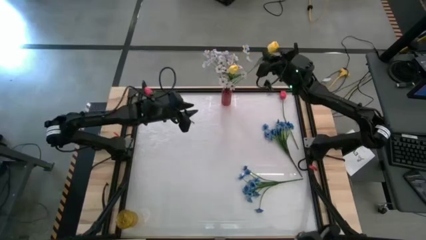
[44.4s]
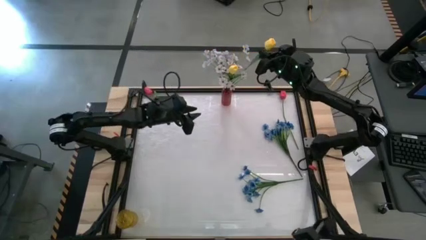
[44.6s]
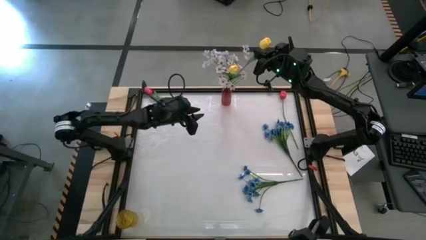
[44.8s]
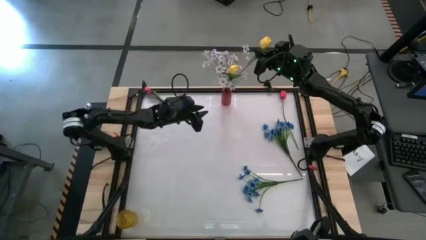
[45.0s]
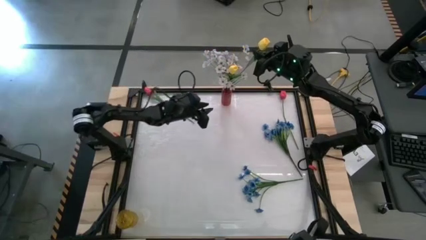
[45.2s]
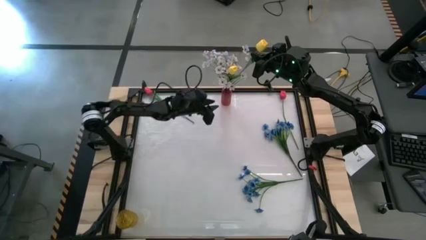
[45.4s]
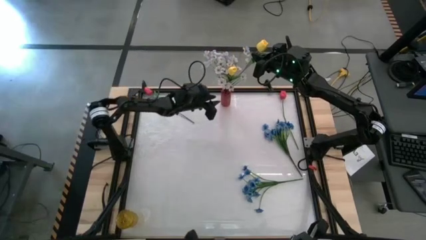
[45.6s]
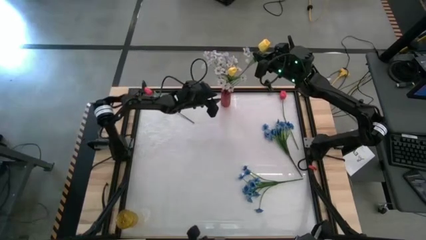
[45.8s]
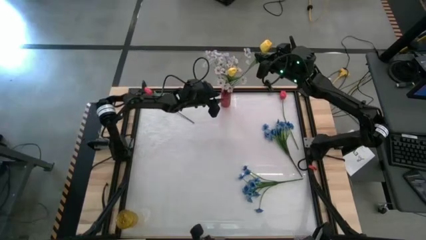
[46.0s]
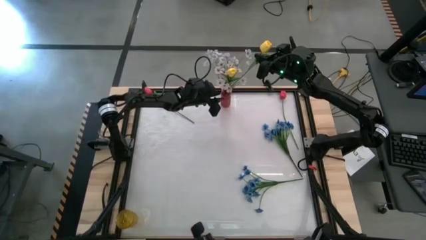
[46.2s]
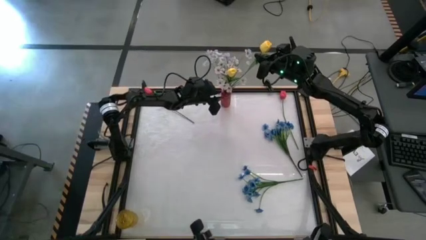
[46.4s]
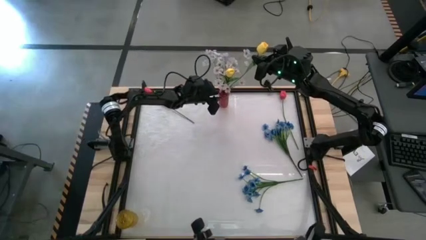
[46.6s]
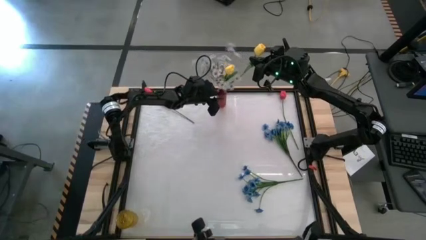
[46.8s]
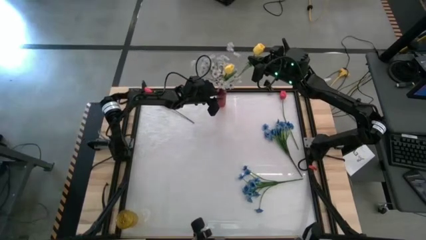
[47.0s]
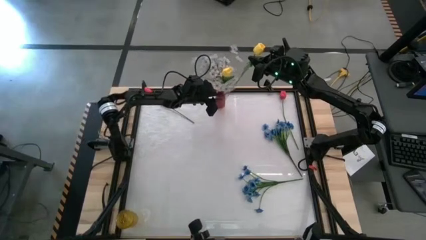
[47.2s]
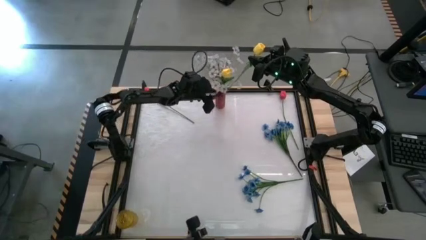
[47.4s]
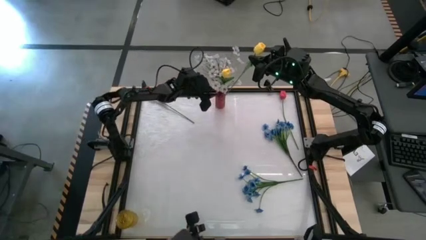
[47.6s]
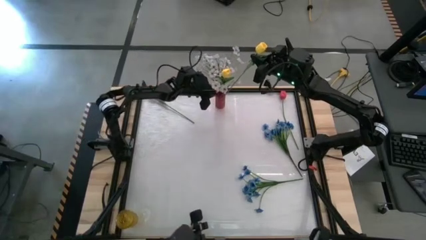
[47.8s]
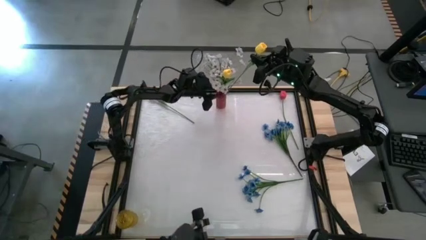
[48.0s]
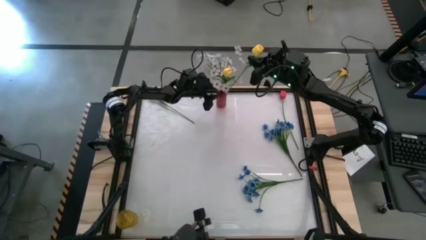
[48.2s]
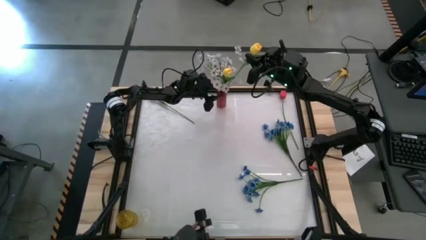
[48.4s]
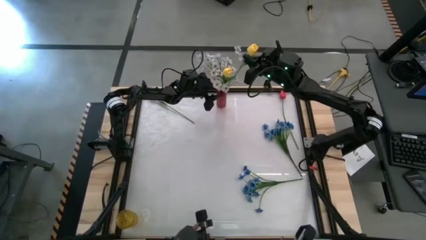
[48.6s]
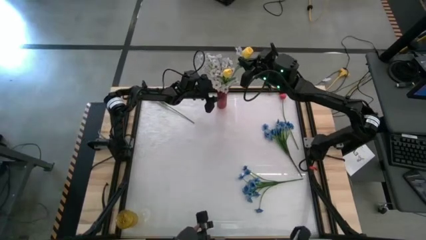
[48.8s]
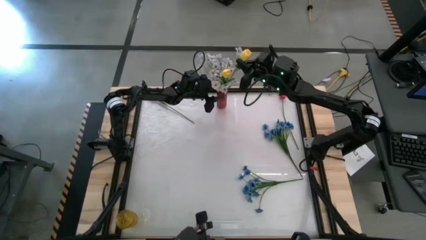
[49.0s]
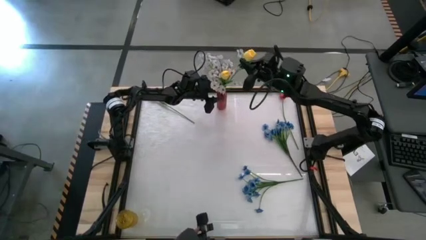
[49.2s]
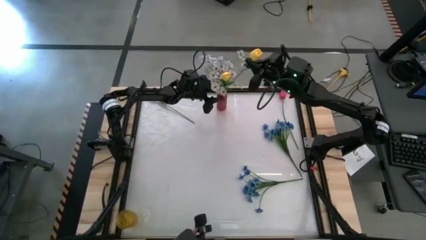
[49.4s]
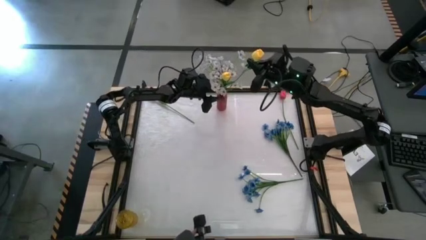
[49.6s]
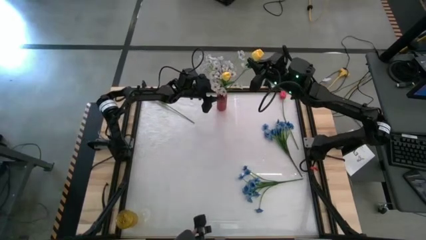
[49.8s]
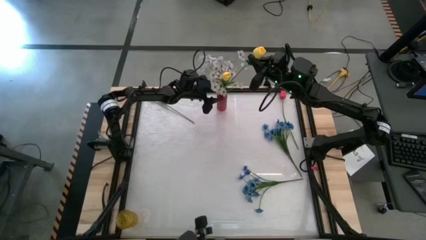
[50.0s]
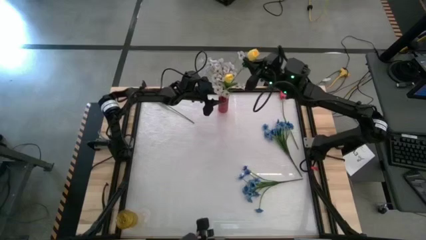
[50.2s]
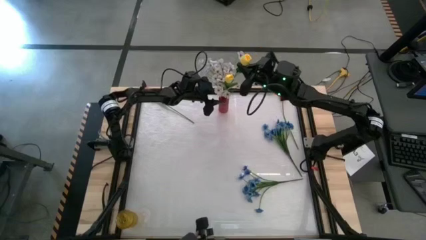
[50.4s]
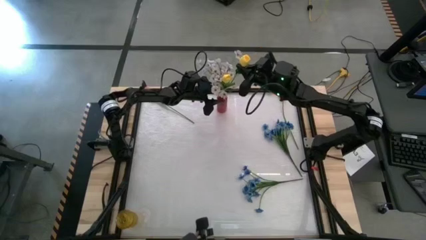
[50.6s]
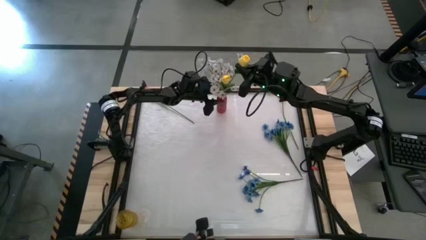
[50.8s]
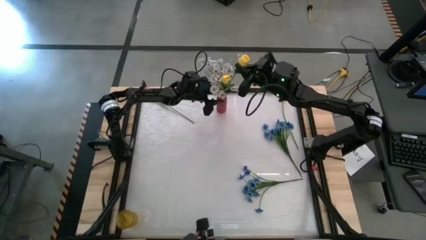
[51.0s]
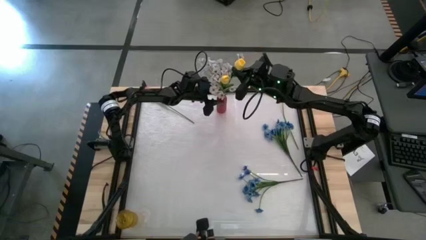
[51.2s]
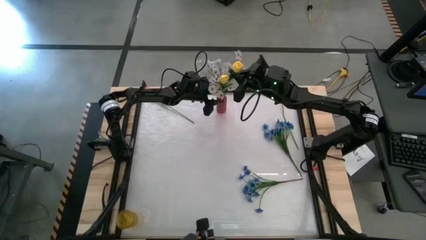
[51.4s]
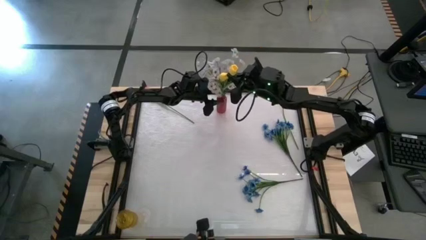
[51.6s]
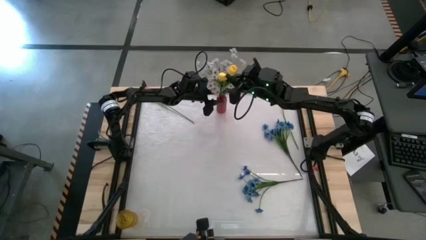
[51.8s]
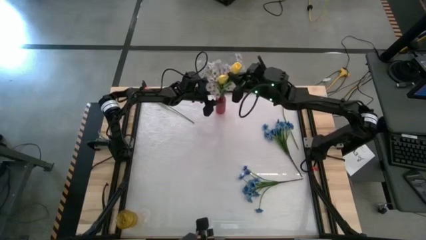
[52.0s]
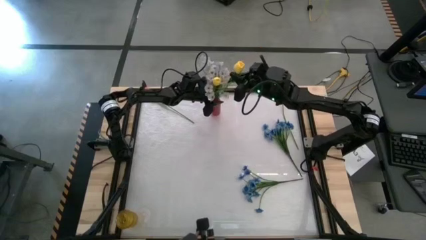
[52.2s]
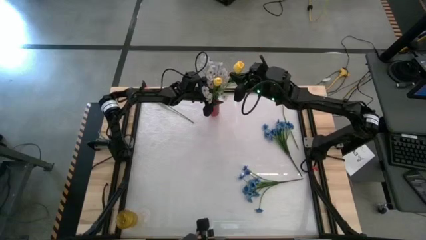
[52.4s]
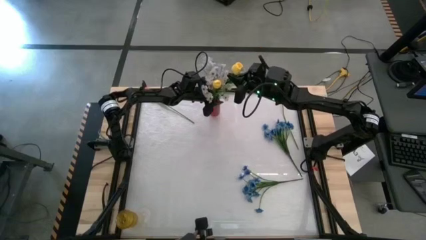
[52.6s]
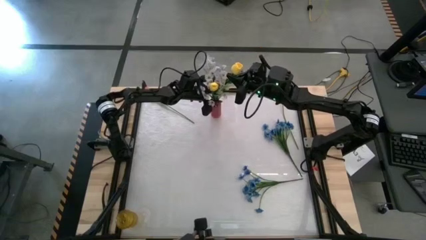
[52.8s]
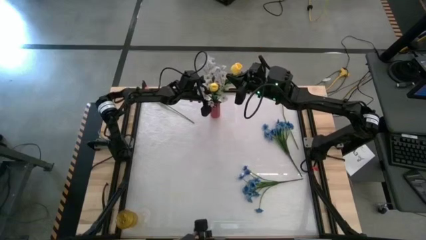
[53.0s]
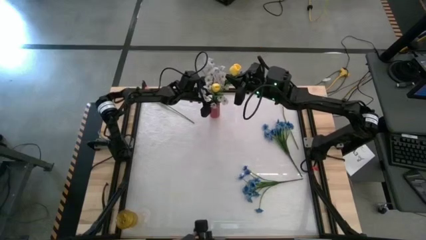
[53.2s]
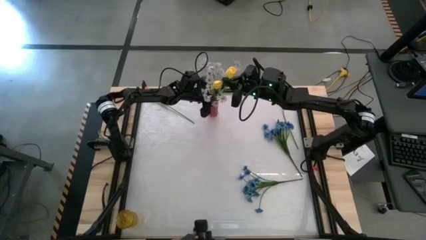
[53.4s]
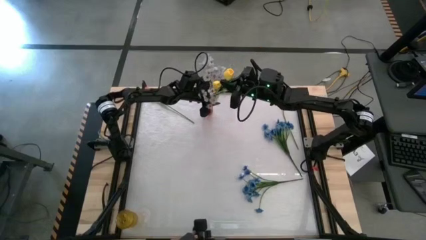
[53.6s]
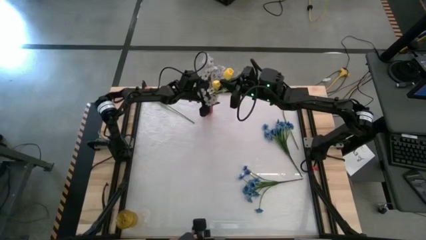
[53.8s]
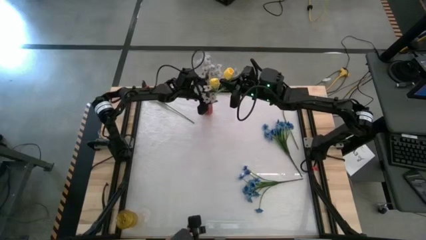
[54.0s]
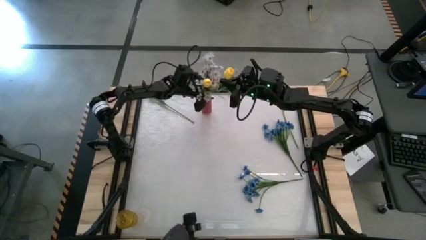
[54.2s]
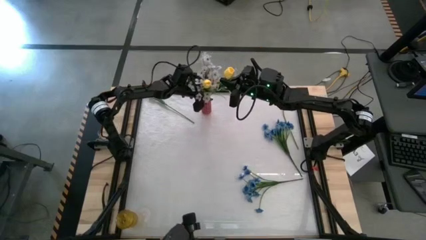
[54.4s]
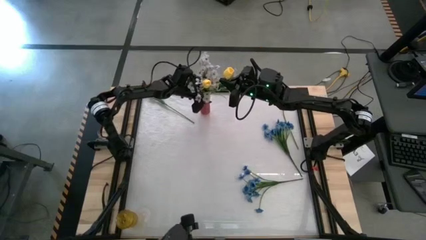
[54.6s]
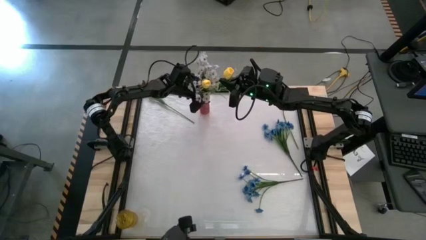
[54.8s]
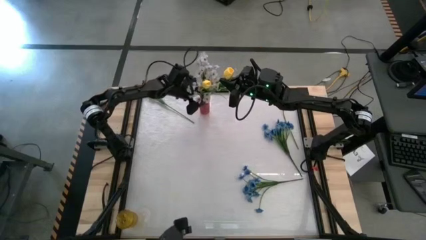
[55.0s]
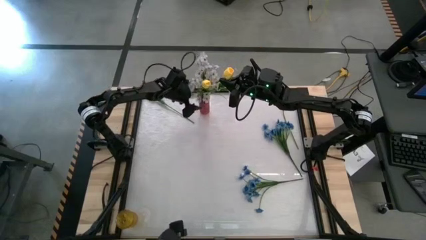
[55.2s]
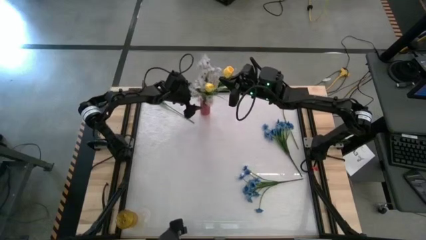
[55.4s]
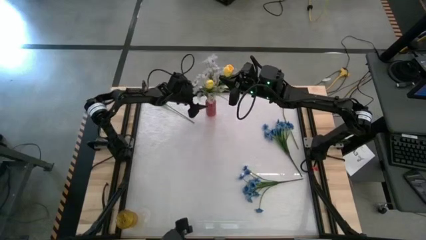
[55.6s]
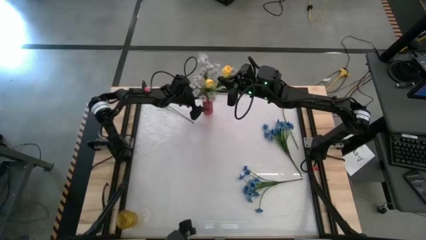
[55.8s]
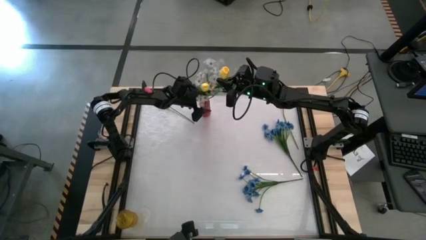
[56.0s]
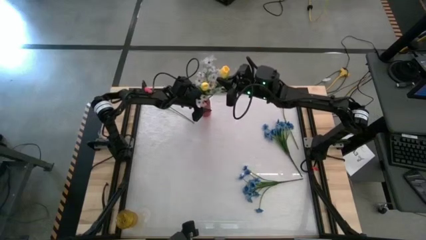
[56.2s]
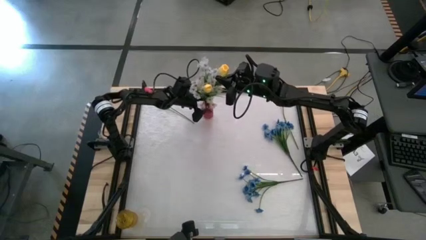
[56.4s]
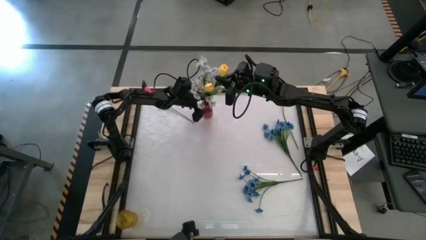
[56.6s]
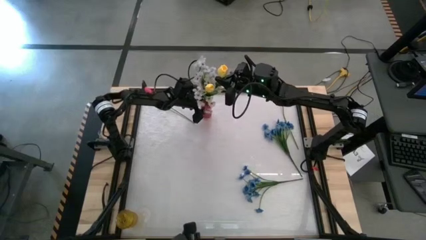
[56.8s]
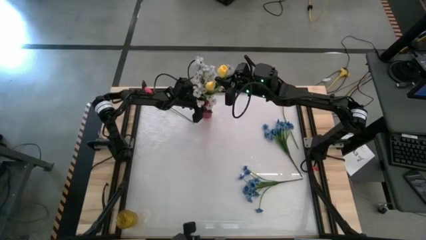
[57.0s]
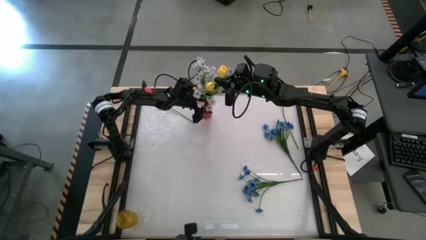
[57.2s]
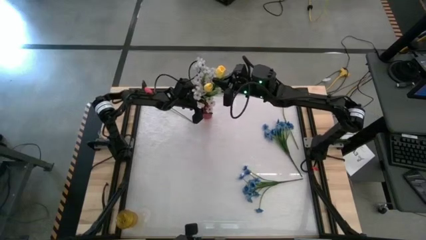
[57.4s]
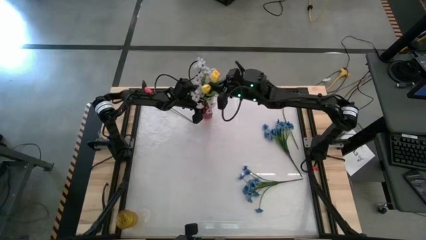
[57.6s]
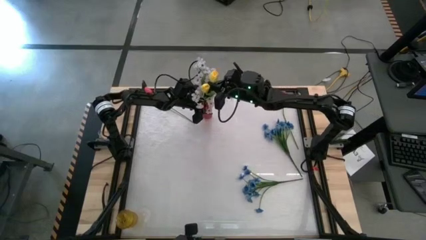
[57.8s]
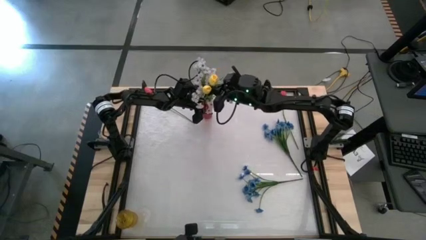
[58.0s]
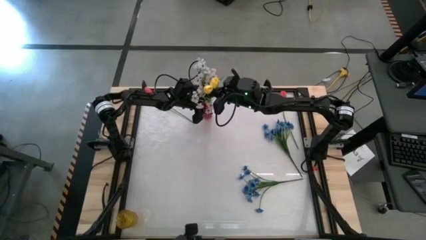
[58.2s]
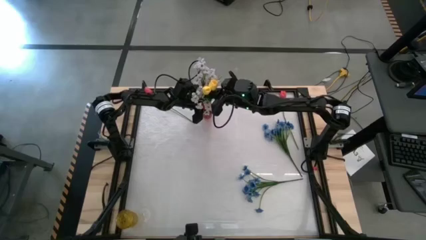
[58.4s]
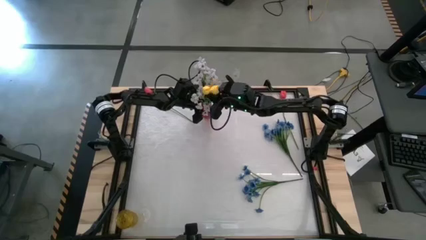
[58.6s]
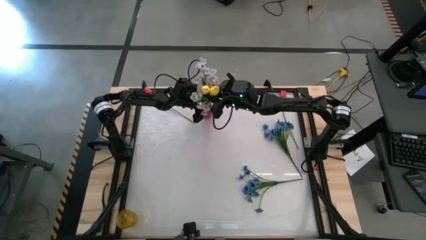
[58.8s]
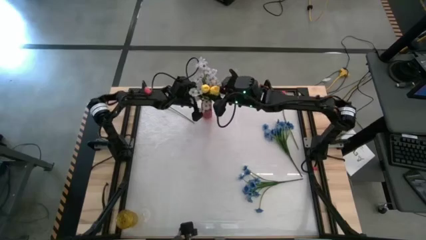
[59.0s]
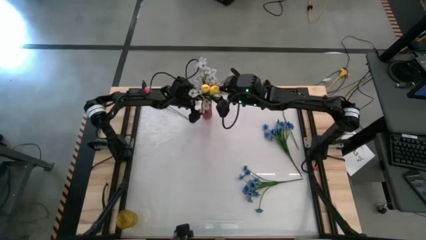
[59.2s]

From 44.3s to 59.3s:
Task: Sort flowers into vase by color
Put the yellow flower into the red vase

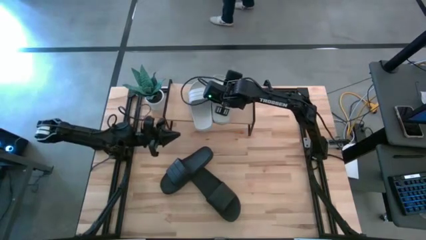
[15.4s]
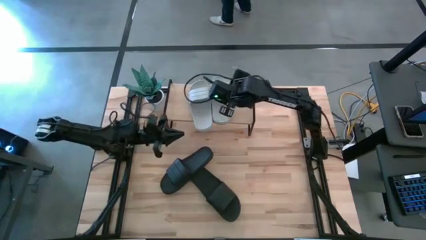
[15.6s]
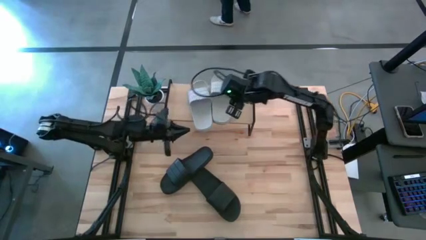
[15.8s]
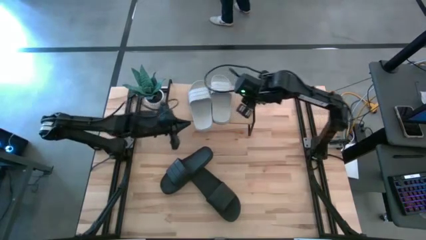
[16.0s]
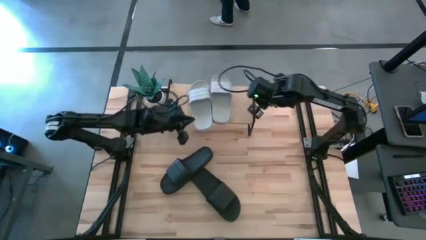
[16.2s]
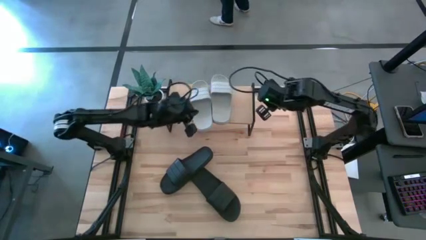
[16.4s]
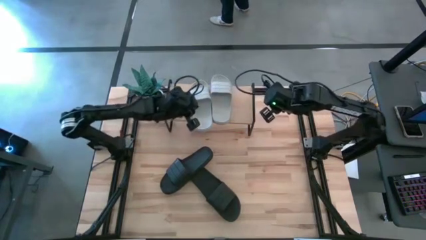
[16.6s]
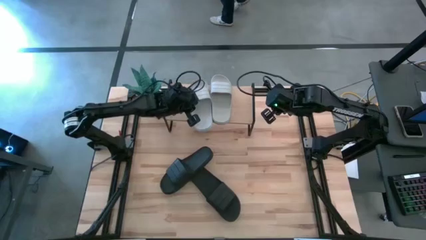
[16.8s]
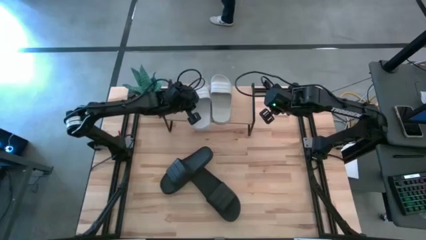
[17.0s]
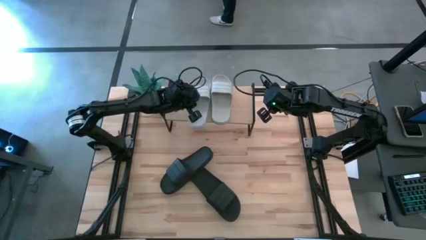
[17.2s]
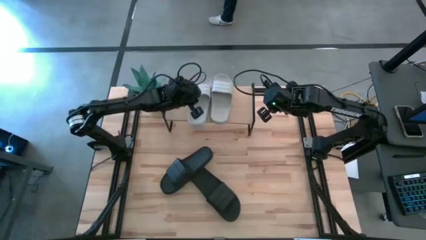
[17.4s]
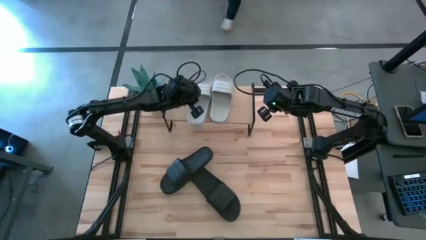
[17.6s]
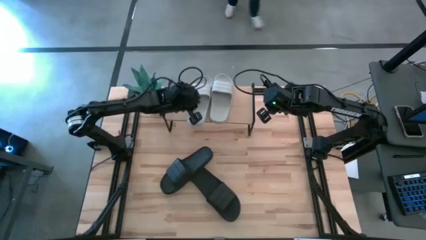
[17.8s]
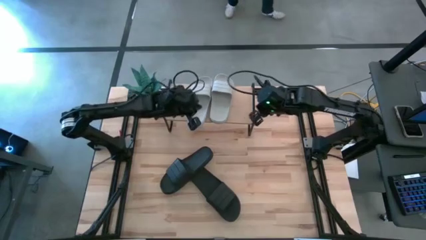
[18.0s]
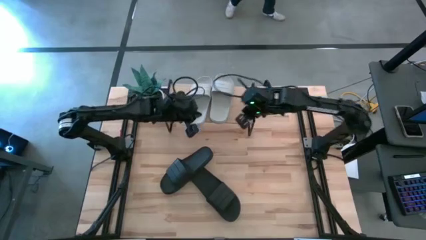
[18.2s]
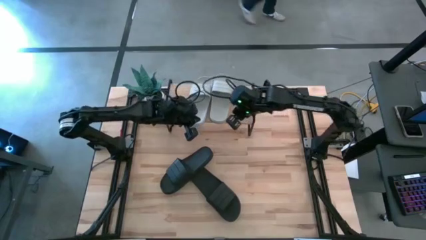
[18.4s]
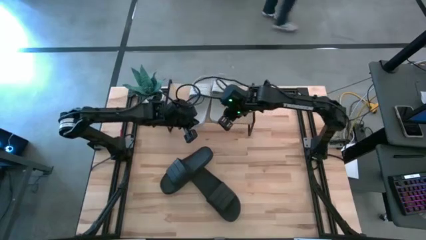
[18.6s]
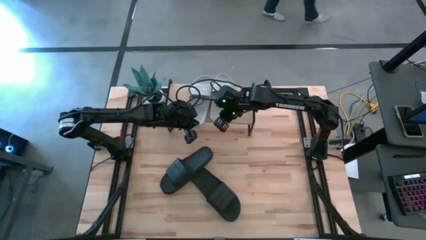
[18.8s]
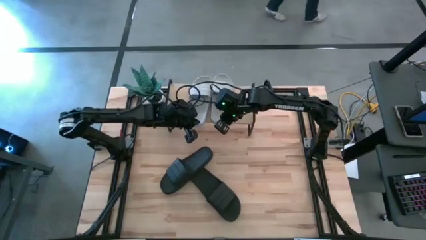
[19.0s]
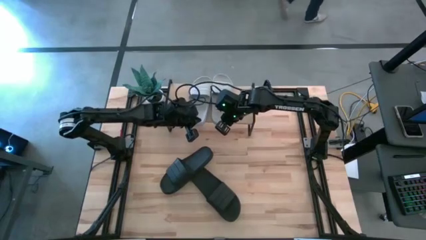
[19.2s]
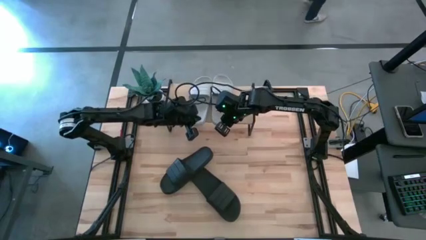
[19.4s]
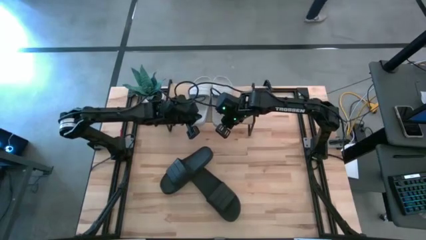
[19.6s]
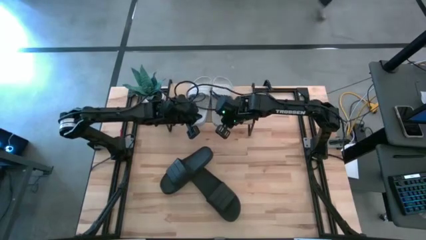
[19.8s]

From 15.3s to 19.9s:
Task: Pick and place slides into the shelf
Adjust the gray slides on the shelf
